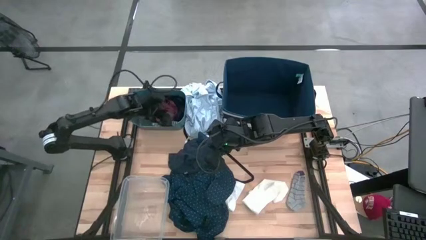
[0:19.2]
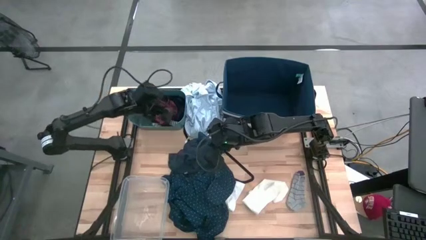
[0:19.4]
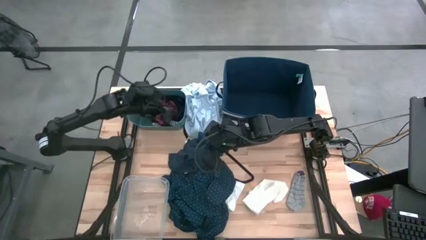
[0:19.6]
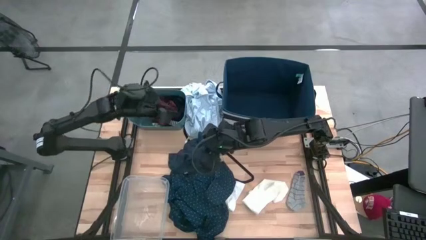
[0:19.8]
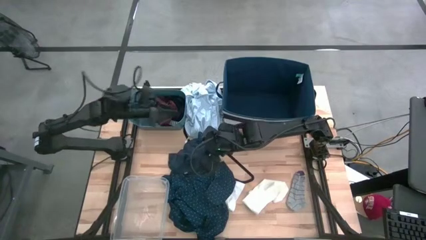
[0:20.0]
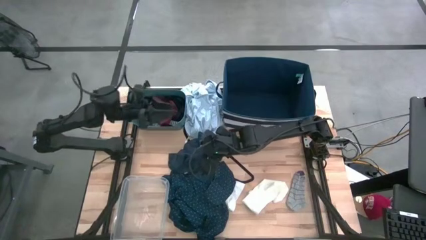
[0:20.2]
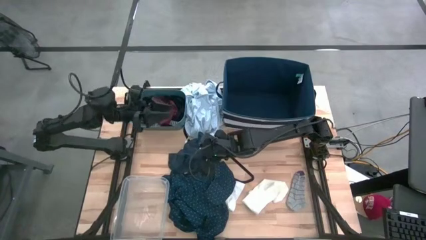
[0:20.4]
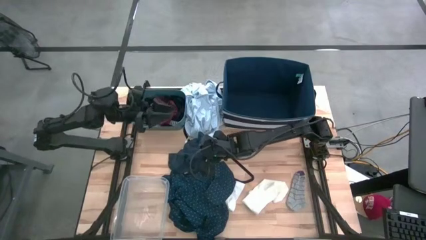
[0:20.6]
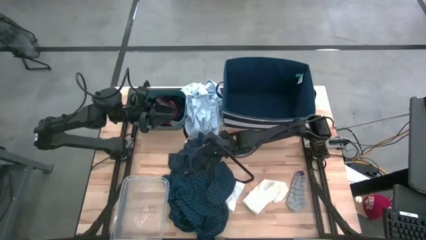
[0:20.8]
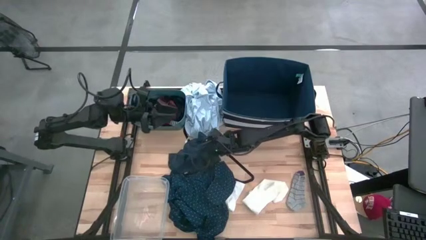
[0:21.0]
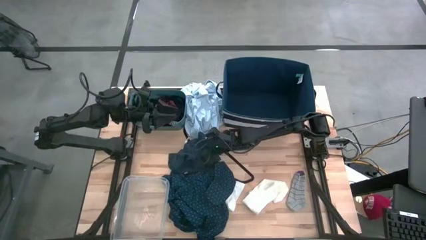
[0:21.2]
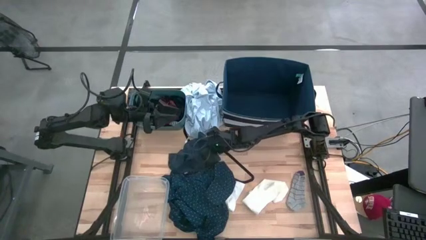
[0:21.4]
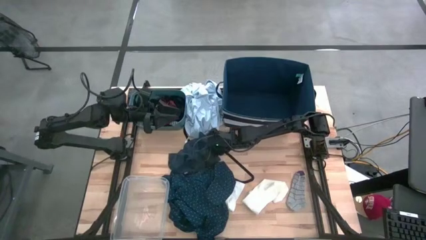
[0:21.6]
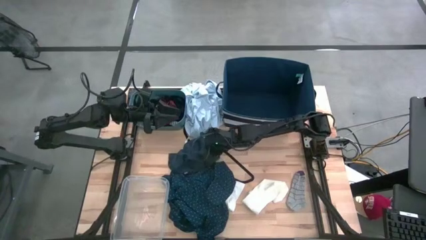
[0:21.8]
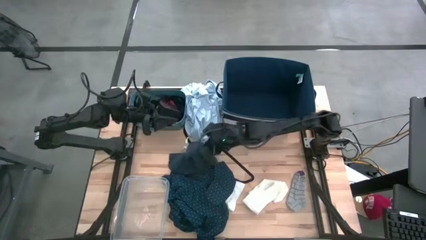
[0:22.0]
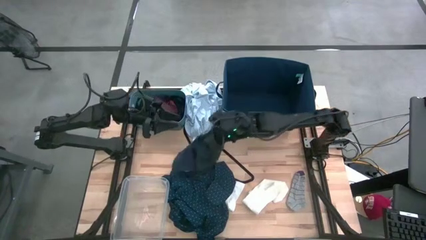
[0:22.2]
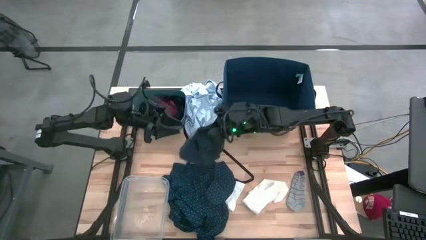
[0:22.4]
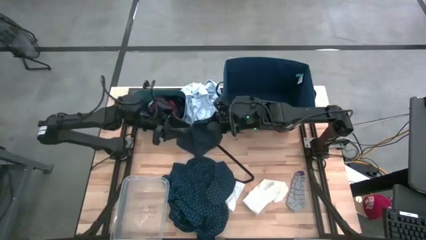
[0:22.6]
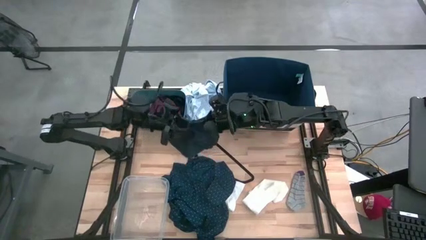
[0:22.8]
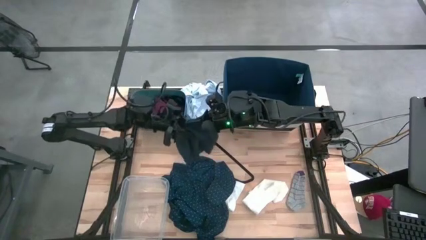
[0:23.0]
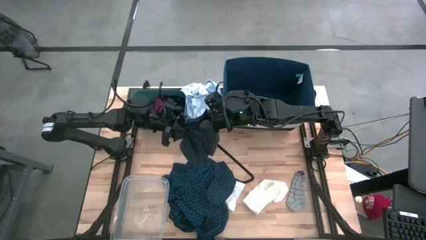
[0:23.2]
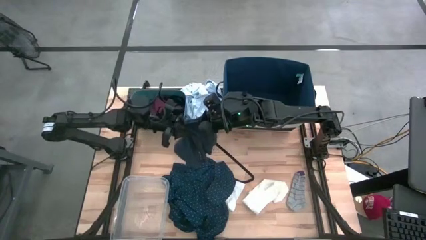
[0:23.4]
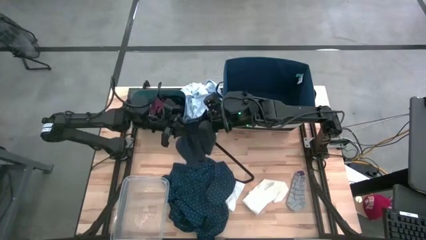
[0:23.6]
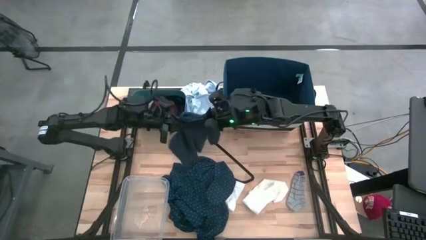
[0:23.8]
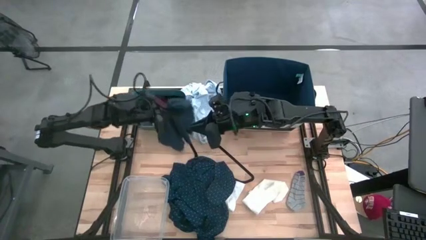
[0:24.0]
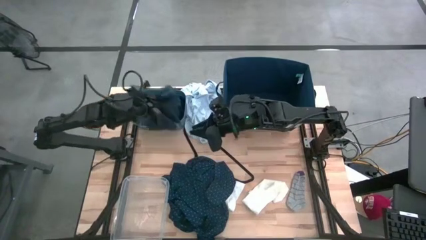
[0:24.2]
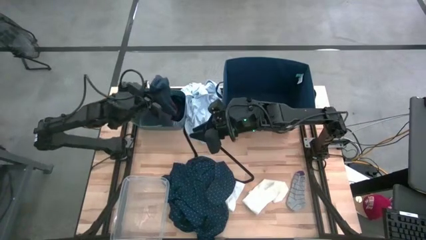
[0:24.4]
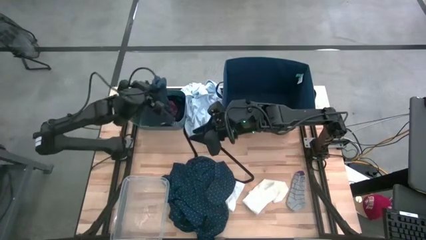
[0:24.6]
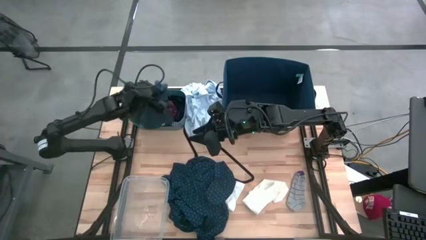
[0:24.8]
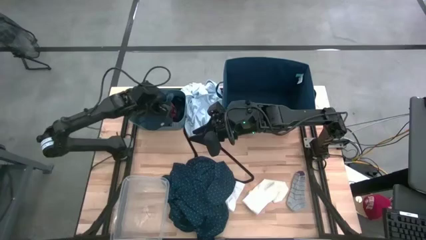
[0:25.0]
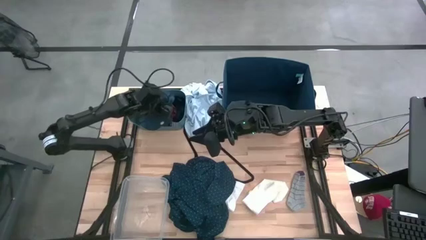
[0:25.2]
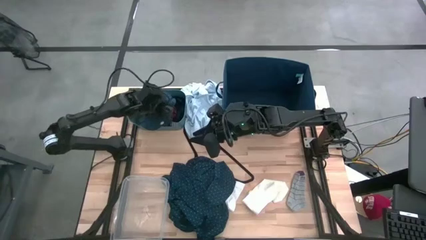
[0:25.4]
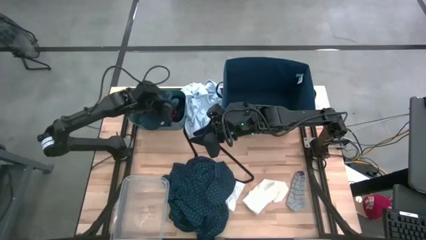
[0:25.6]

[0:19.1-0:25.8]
Task: Pick & Place Cloths
Put the dark blue underwear into the green bin

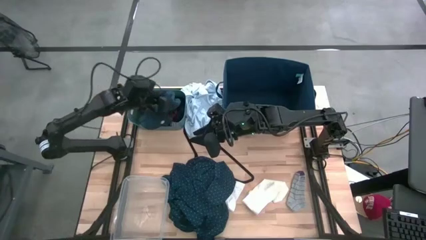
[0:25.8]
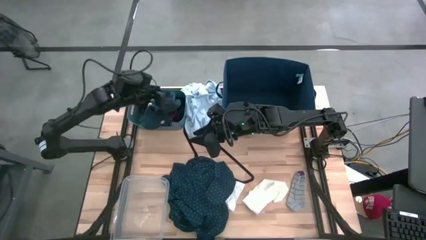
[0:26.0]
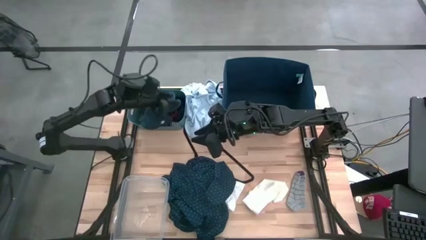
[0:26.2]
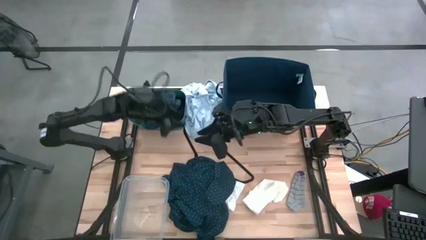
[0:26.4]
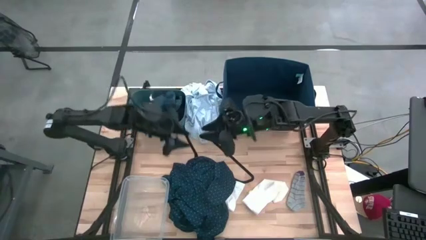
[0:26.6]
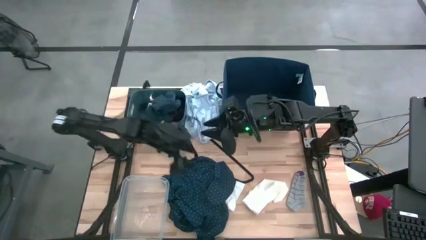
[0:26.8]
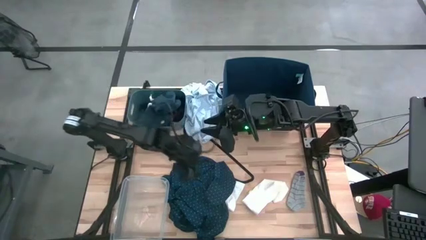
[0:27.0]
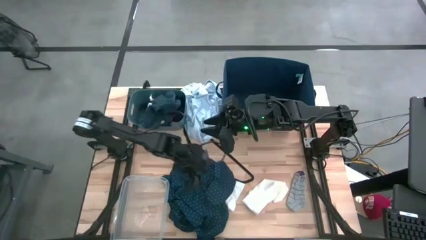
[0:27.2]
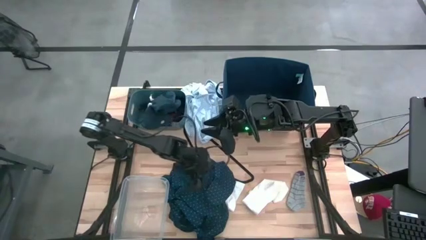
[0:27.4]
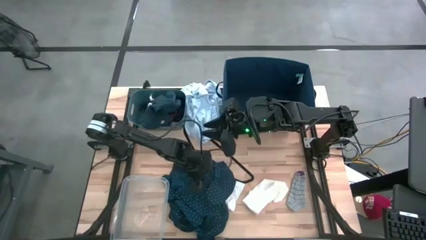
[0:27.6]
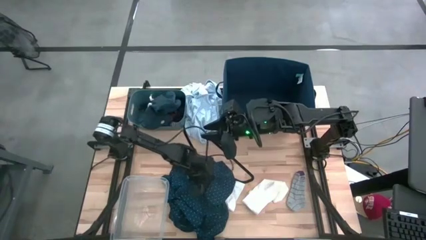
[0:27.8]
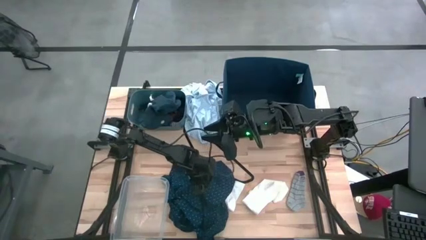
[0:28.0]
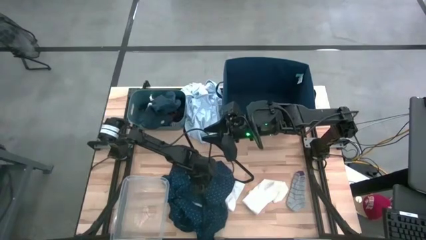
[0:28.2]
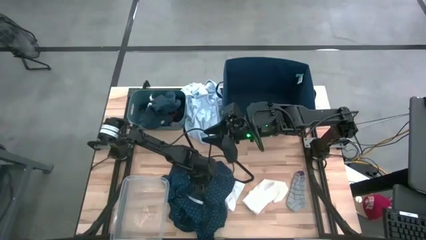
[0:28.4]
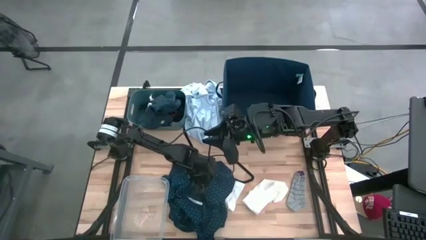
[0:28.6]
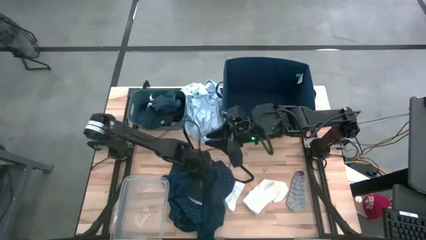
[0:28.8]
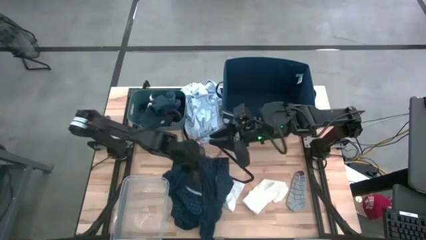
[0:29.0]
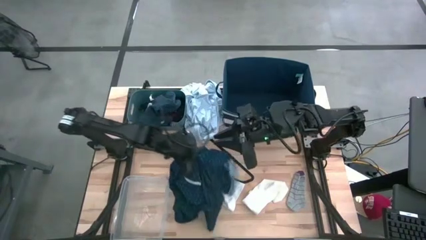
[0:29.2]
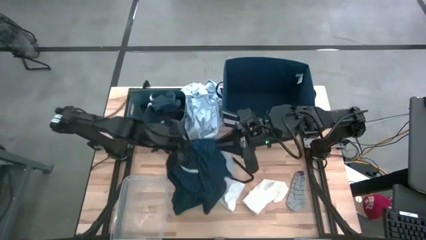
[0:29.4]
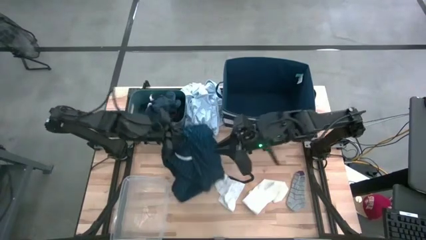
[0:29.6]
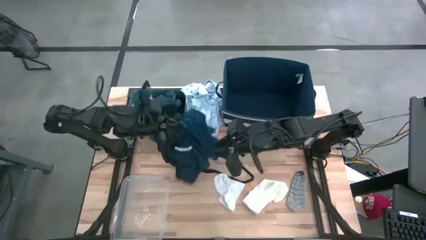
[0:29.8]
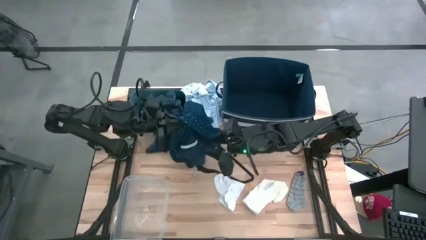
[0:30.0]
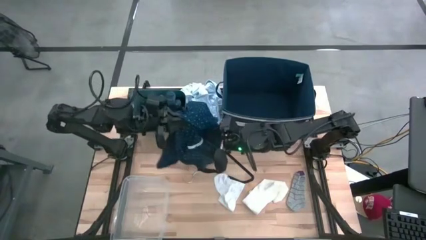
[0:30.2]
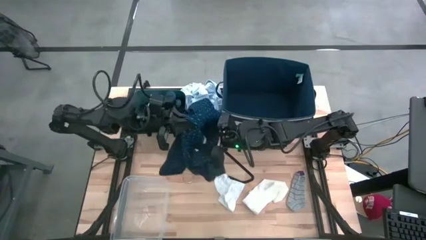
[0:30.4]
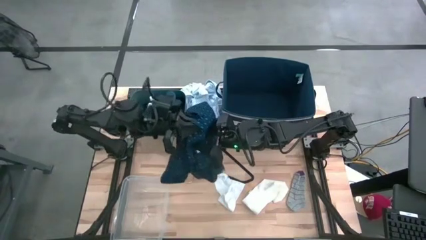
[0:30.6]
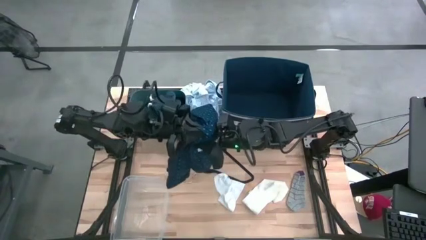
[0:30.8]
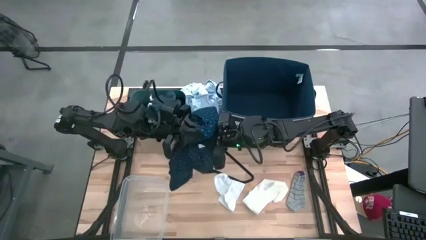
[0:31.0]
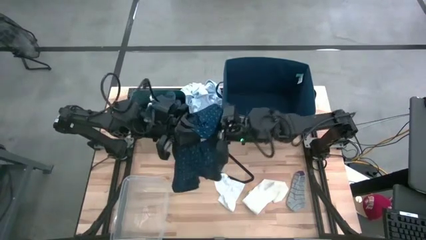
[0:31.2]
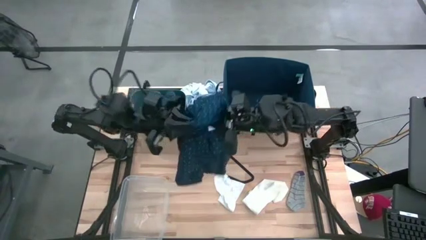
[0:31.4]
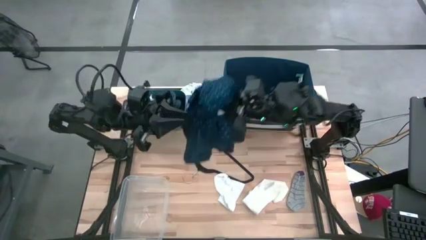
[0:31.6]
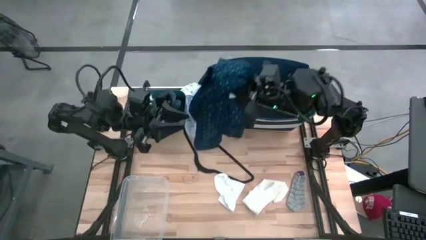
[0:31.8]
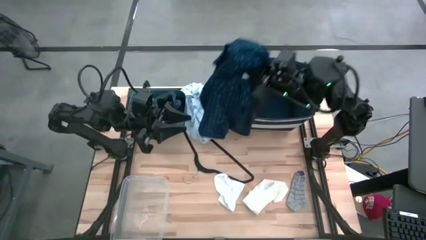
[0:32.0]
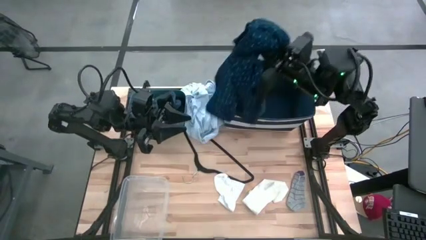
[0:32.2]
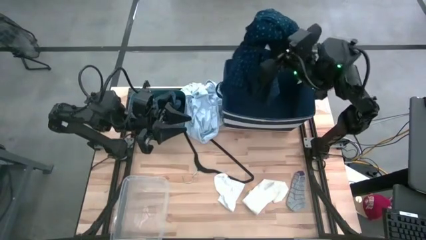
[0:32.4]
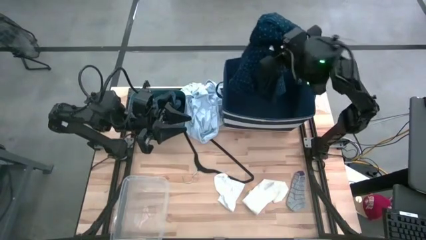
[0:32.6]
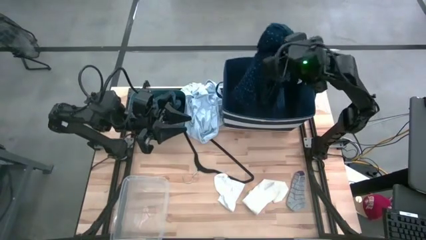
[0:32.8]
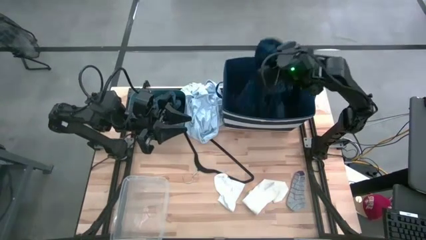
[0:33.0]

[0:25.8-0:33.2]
Put the blue shirt into the blue bin

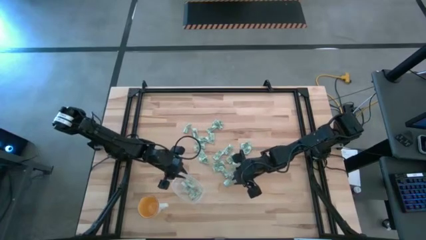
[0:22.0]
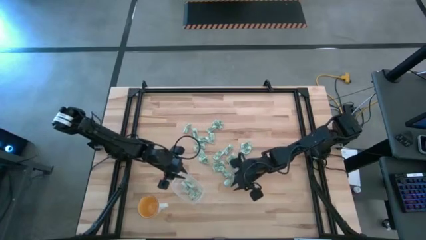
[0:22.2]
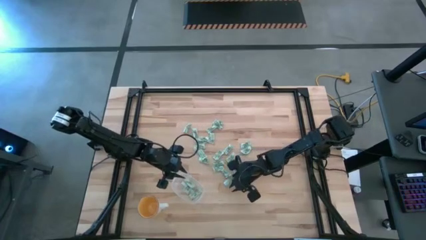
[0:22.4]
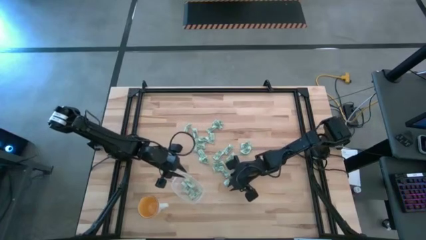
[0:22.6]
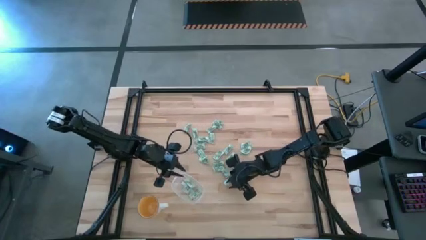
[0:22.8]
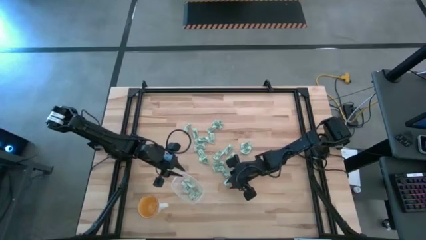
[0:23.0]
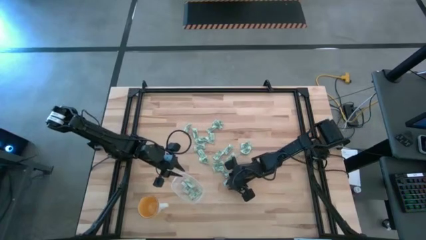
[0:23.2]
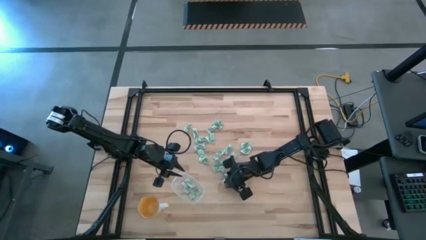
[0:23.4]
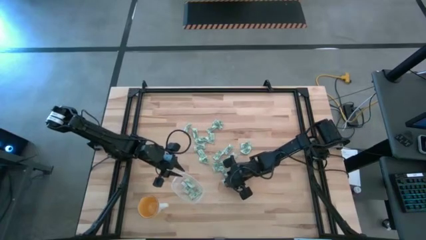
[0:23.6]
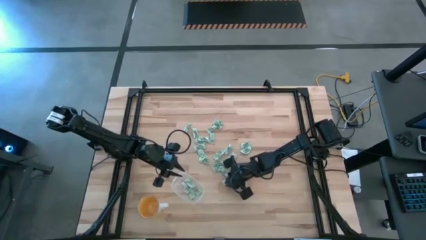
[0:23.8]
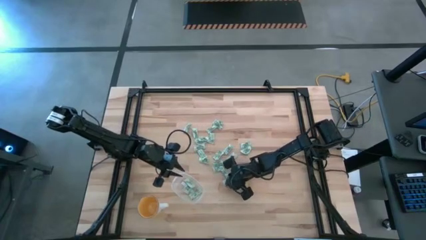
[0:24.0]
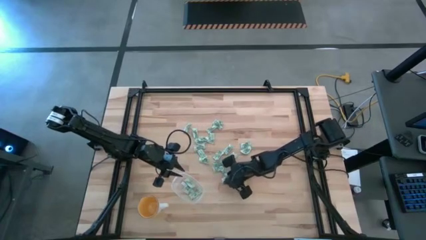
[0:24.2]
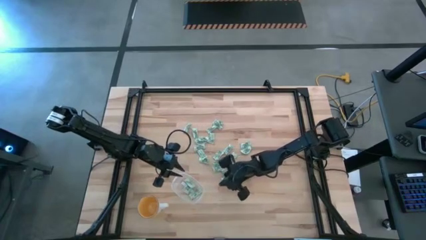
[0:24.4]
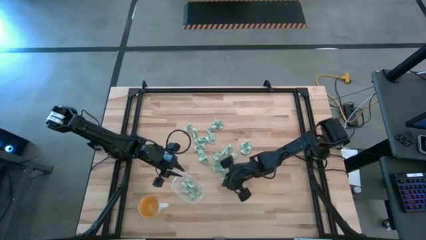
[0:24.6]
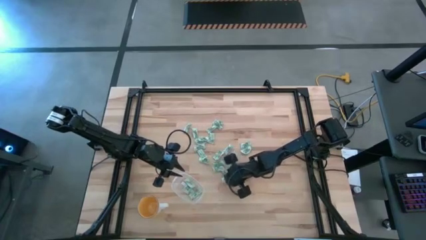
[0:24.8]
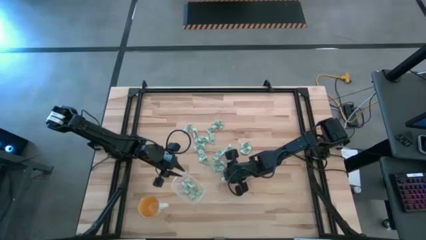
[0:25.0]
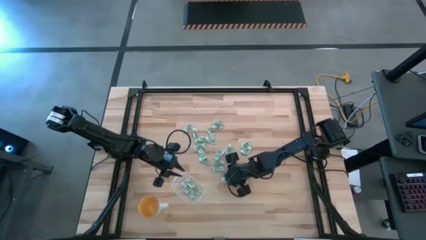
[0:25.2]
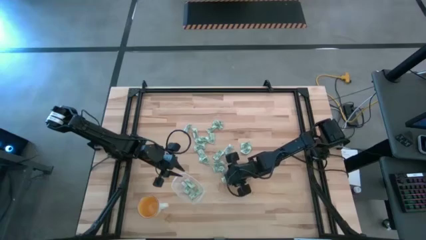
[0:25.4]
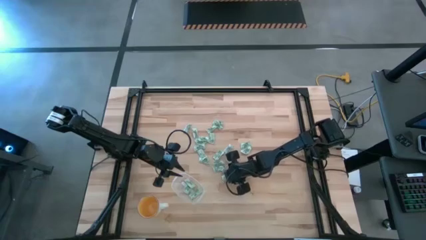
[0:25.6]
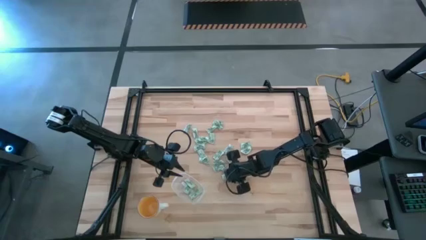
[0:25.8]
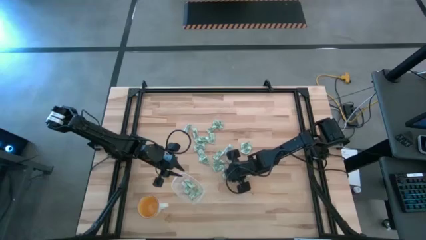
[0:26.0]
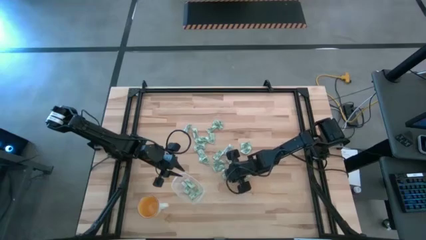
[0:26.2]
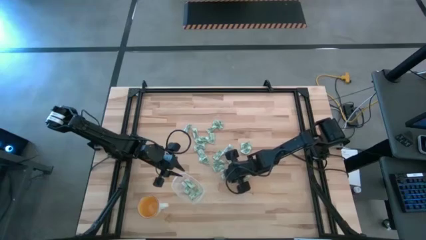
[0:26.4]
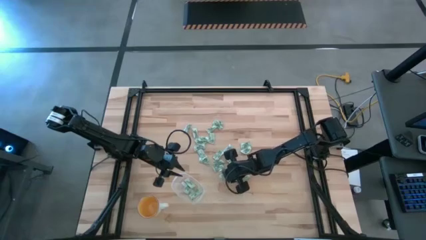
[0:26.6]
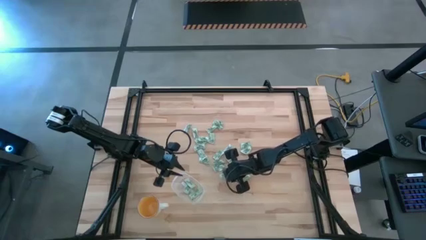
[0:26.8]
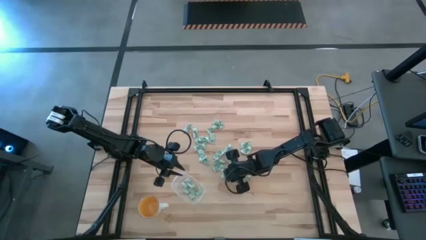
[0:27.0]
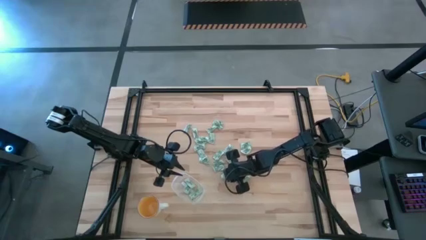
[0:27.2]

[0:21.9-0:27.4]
Task: Pick and place Stevia / Truvia into bins
Put the stevia packet into the transparent container
